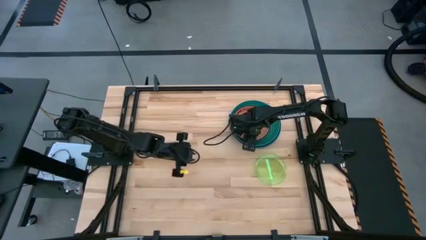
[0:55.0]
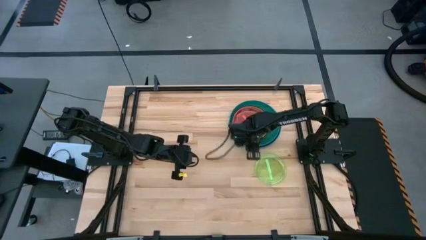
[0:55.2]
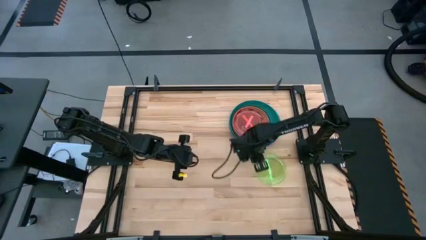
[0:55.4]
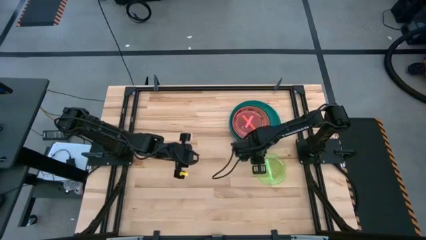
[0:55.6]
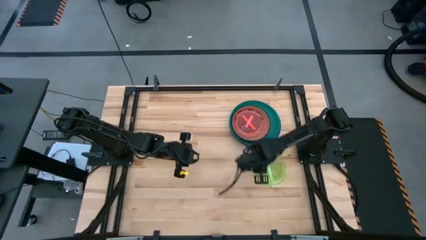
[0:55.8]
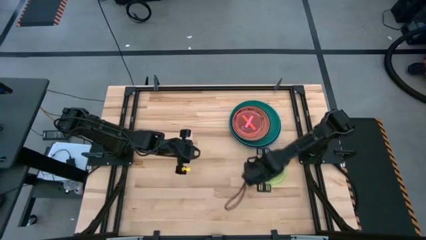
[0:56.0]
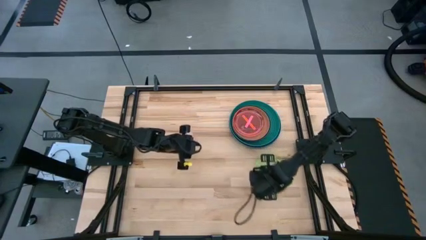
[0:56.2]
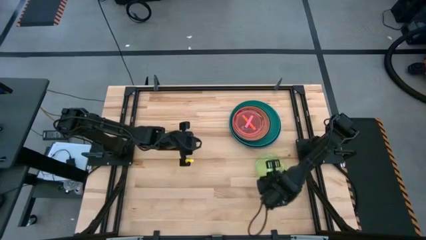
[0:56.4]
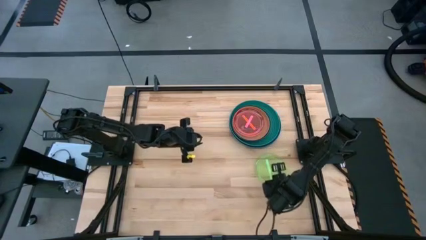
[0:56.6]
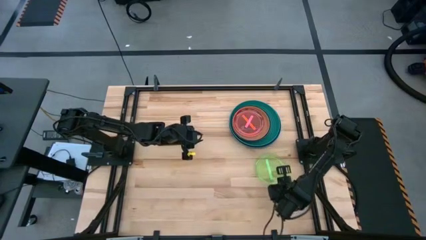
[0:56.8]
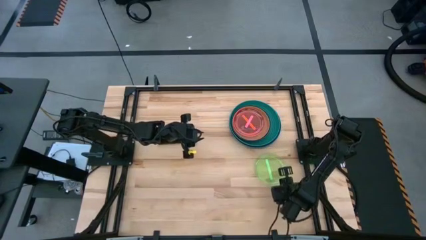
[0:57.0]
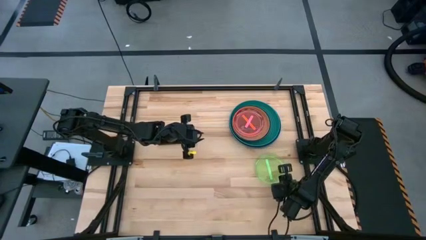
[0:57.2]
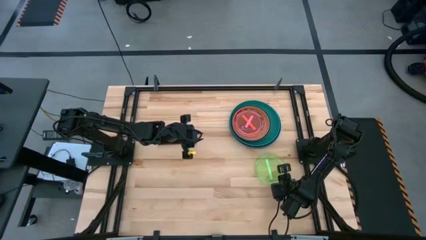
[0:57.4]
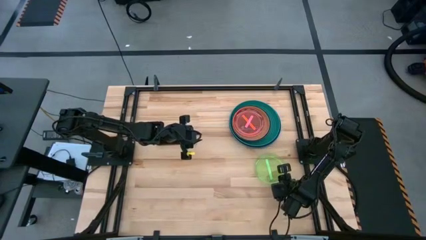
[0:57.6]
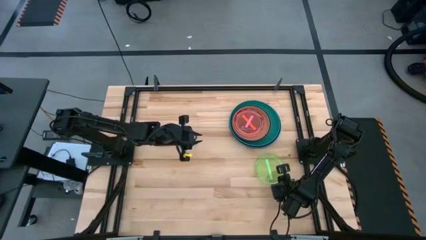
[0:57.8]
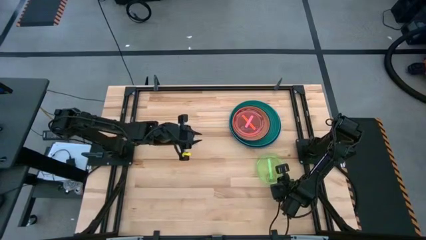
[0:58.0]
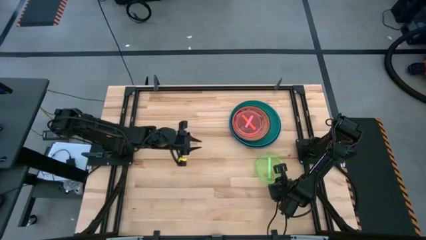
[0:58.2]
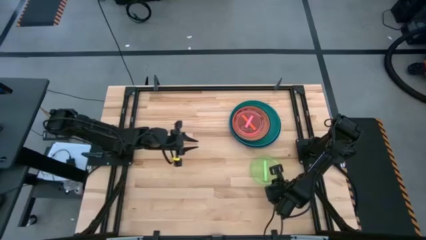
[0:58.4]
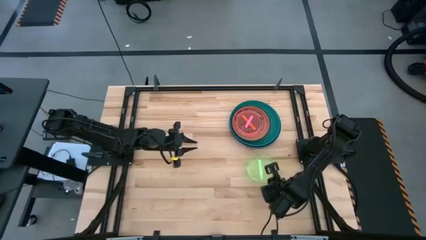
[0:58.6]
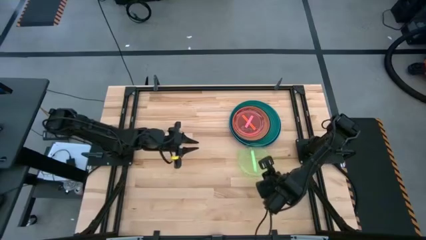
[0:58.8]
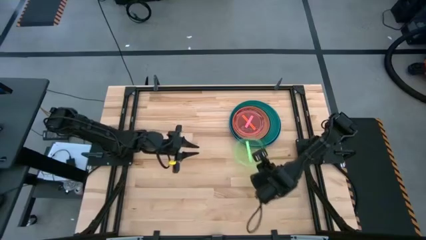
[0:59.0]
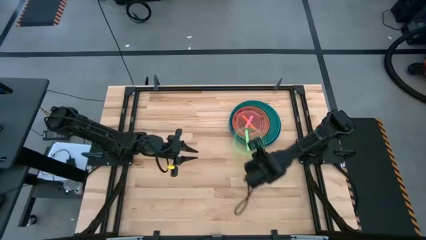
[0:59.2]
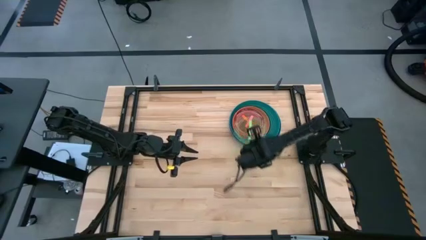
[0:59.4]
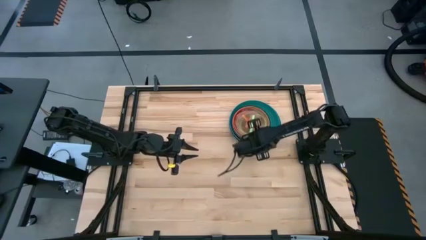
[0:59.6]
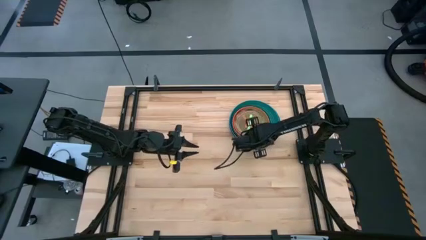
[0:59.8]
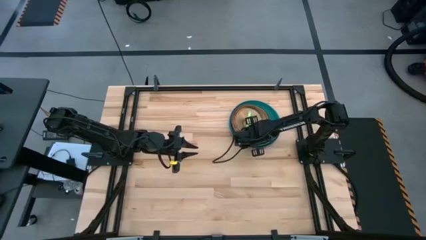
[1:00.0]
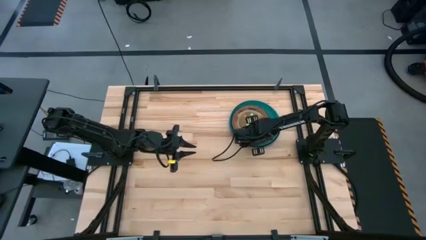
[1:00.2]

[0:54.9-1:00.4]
Task: Stack plastic plates
Stack the light green plate on the pink plate

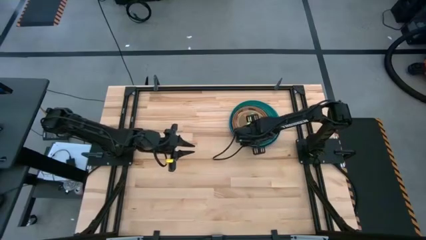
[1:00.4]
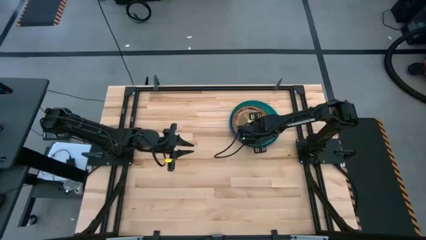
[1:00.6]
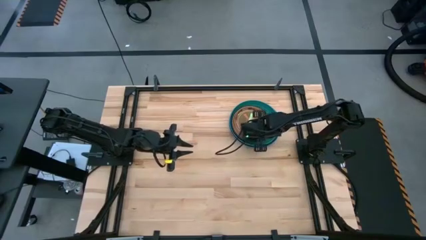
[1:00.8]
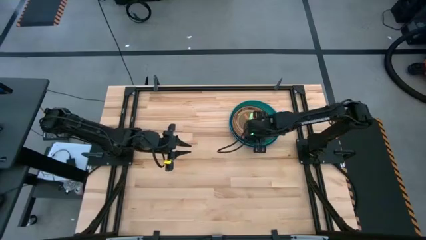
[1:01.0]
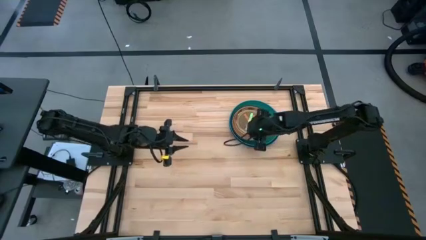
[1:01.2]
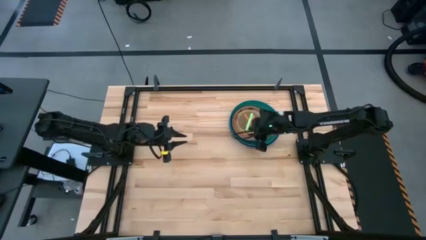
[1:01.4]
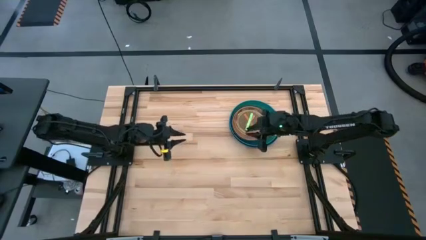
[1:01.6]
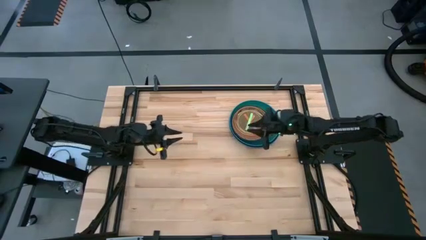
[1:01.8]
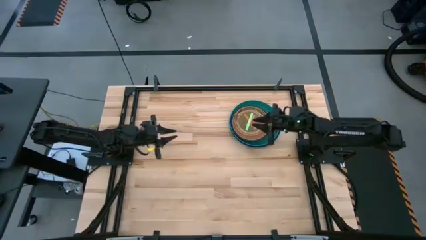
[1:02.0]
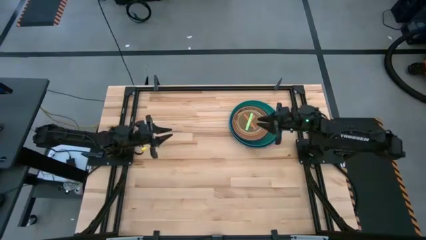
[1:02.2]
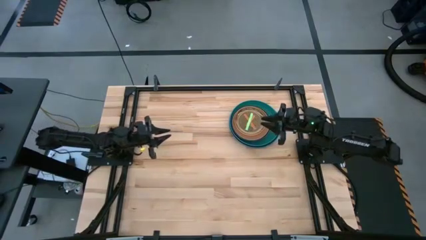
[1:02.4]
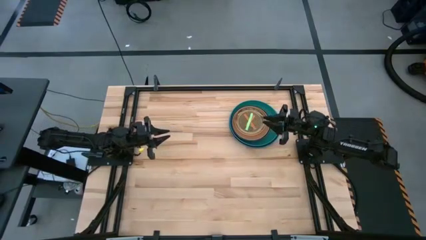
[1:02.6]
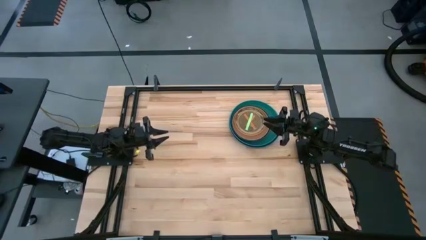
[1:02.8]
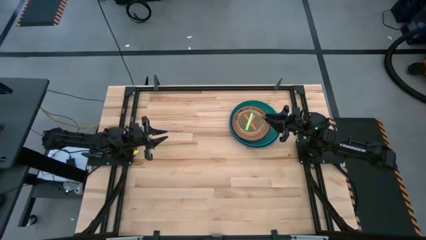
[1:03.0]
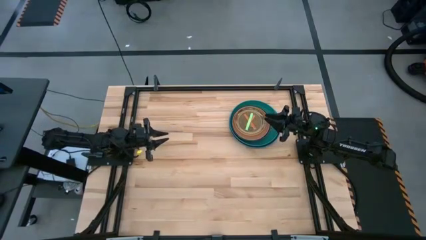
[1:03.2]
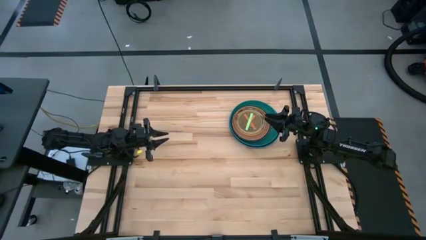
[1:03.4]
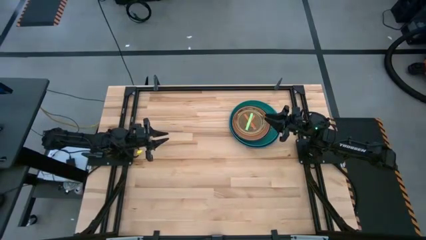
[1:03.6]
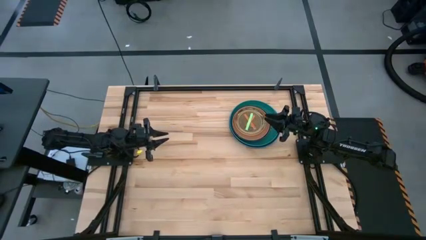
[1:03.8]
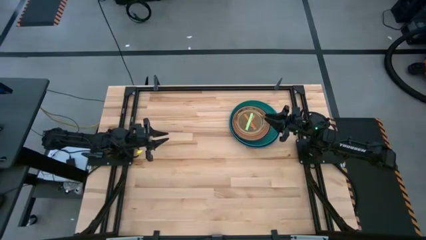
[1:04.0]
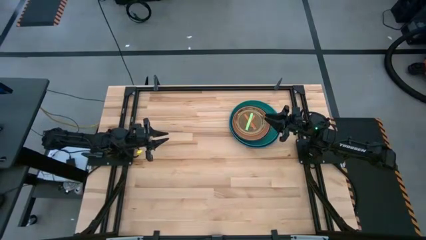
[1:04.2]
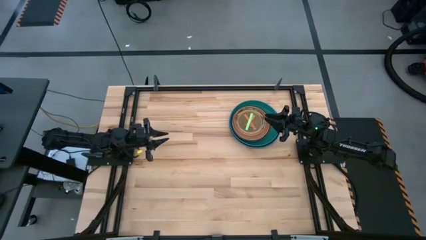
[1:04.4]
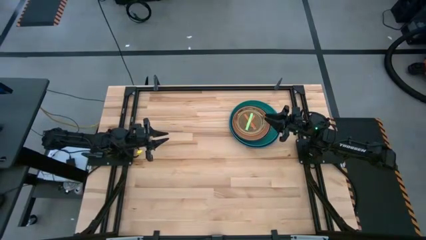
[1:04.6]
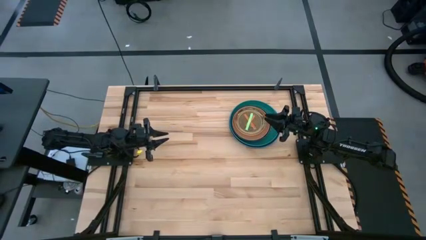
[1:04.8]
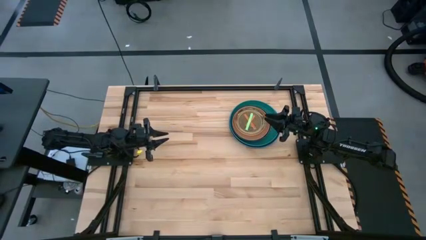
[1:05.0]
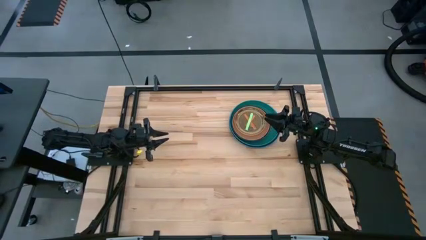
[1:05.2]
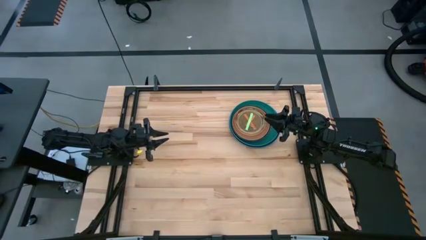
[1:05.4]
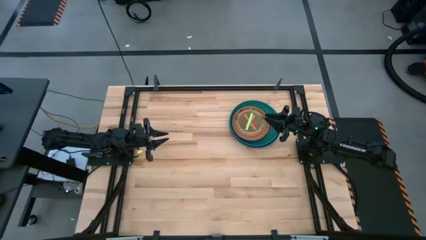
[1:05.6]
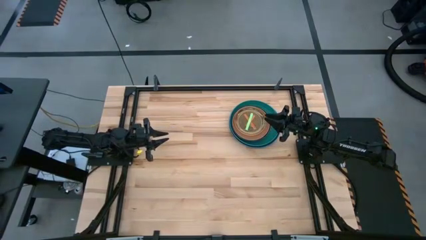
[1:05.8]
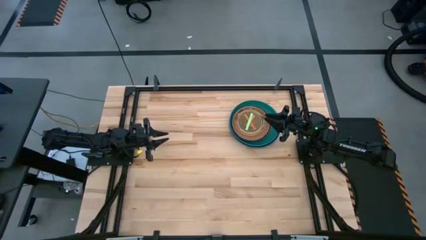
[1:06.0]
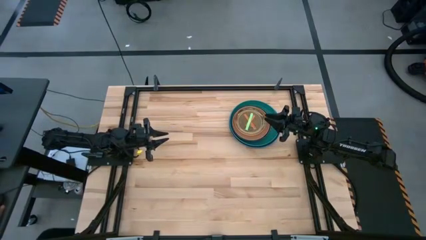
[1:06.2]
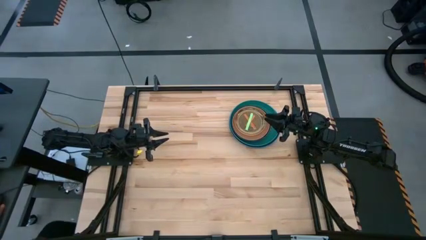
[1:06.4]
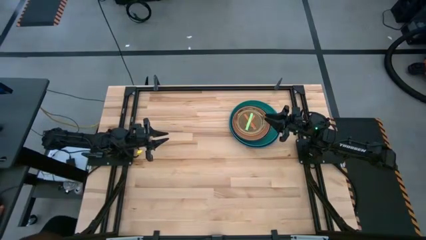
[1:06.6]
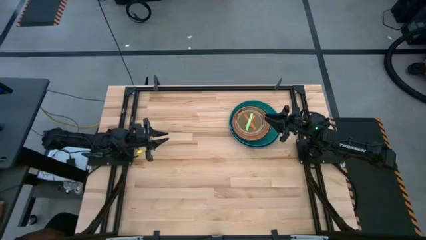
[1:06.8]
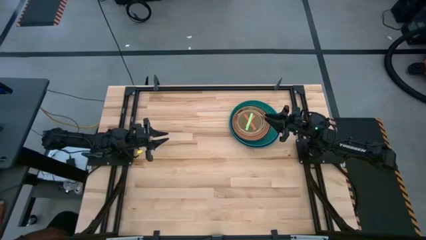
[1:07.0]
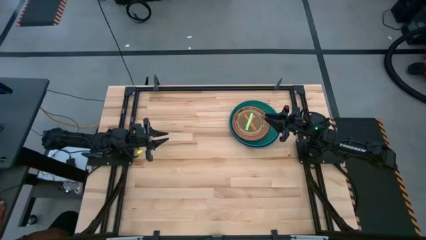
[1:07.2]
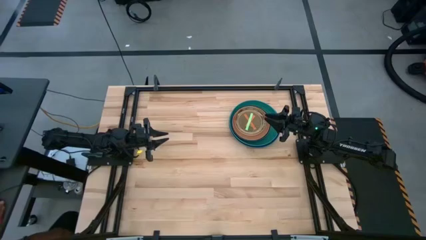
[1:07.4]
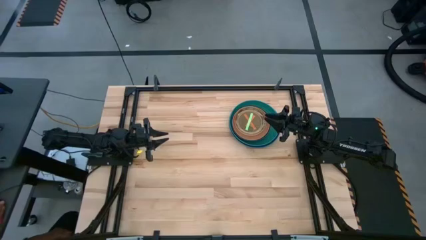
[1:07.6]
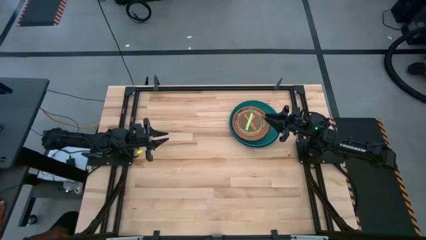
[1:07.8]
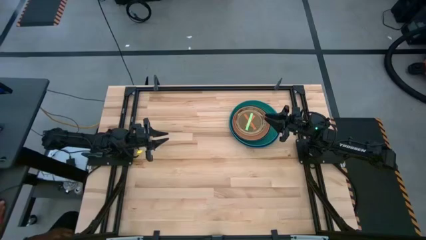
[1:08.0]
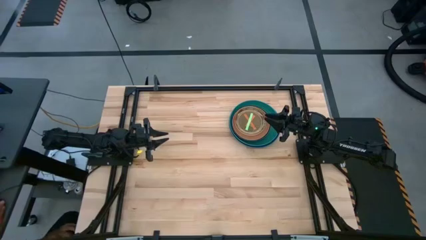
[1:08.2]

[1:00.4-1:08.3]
Return to Home Position

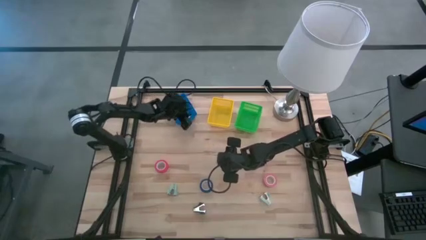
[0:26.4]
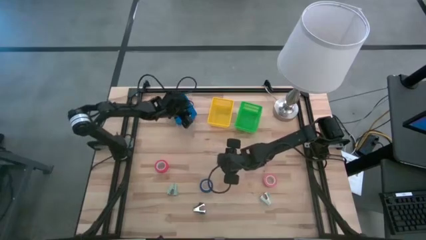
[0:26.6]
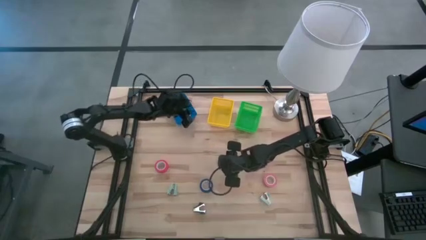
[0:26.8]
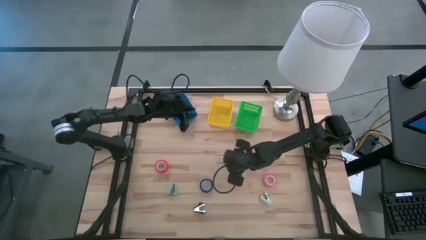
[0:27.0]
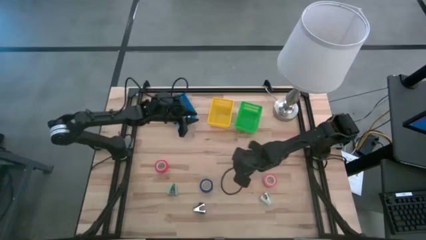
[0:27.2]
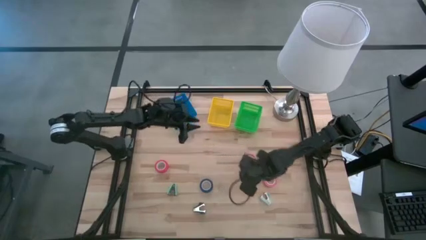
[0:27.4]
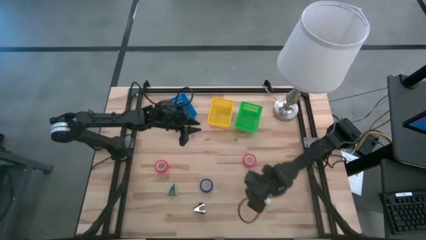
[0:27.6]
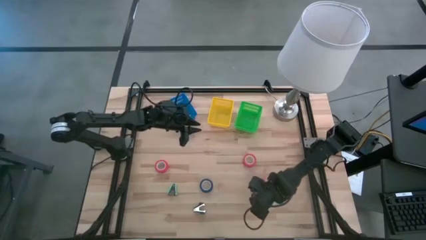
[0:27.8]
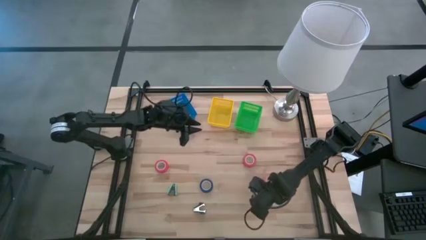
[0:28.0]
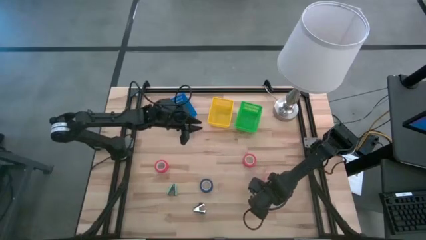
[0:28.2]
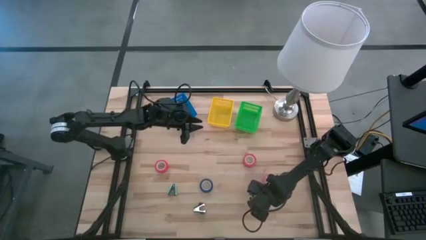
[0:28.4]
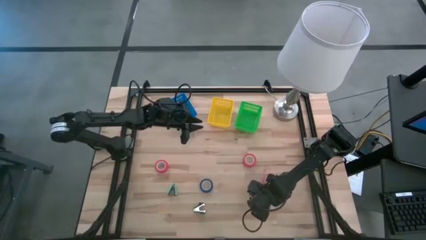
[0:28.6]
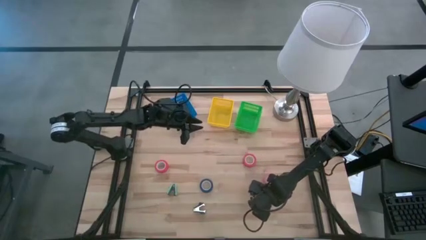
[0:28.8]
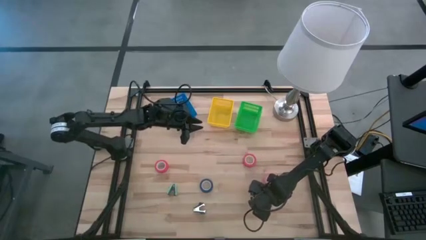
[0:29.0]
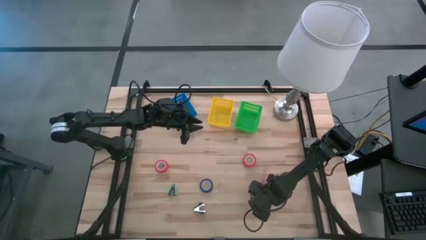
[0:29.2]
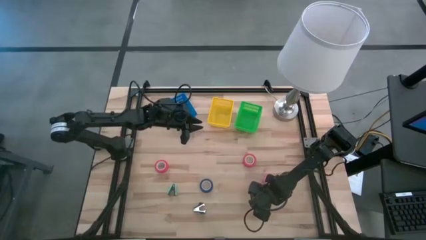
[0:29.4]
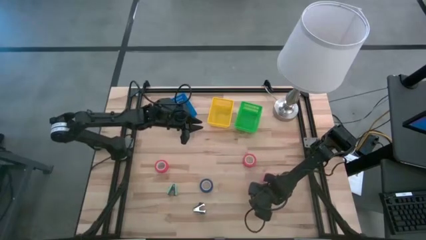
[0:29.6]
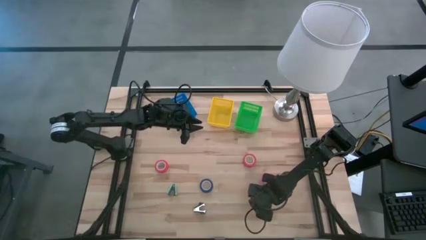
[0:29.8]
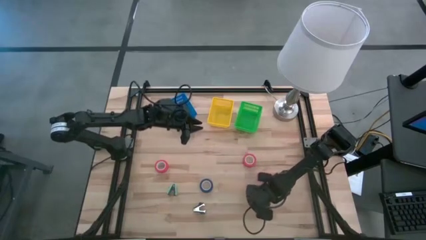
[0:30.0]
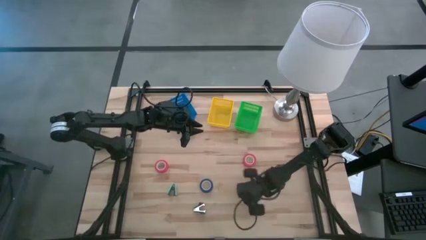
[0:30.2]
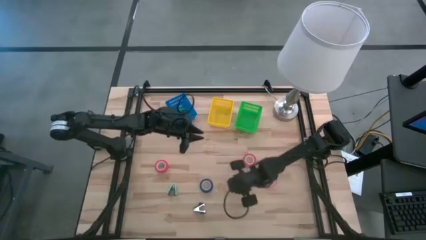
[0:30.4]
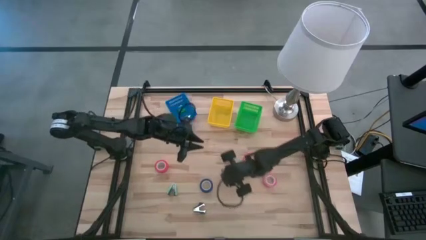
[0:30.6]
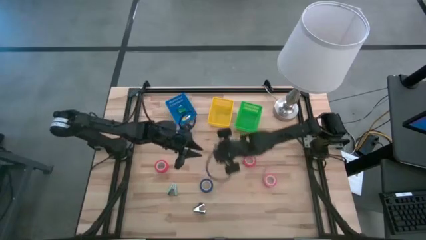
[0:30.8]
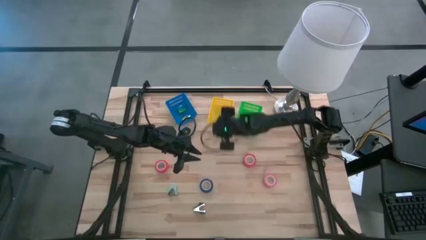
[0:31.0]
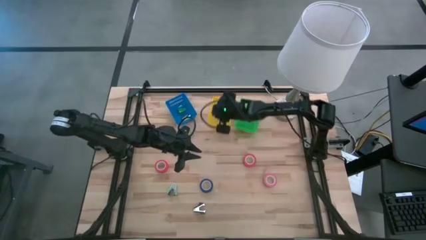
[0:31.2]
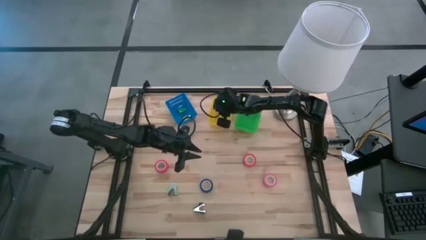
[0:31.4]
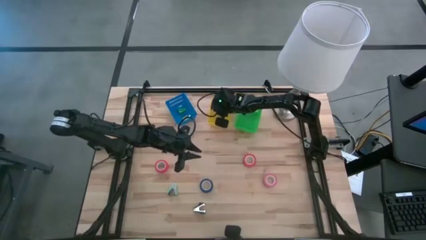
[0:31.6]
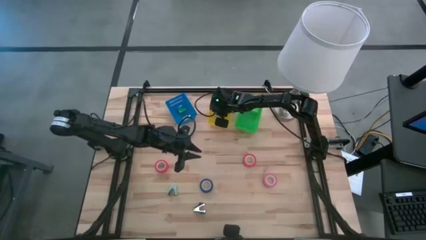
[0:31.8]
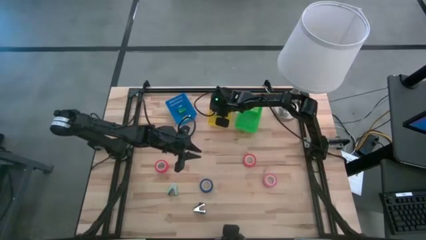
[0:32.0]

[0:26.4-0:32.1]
Task: Pick and place Stapler, Stapler remover, tape
Put the light blue staple remover into the yellow bin
